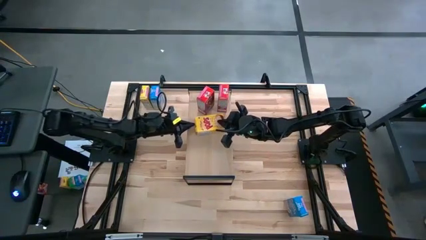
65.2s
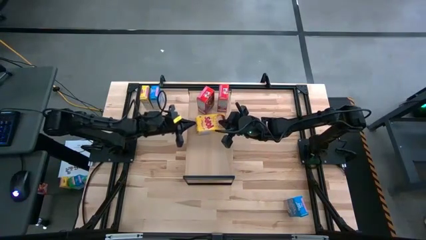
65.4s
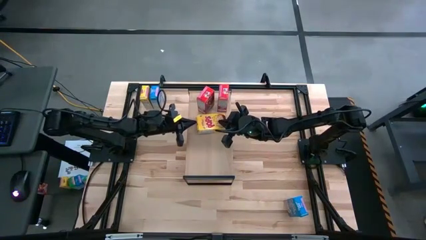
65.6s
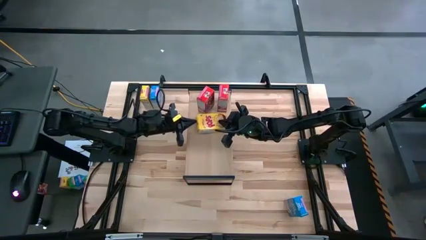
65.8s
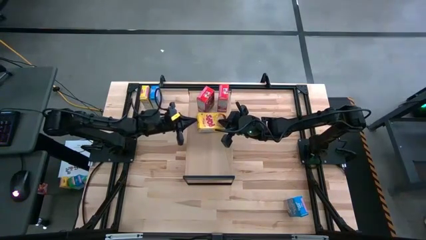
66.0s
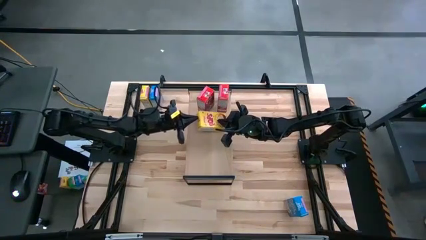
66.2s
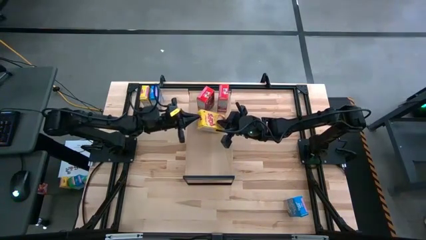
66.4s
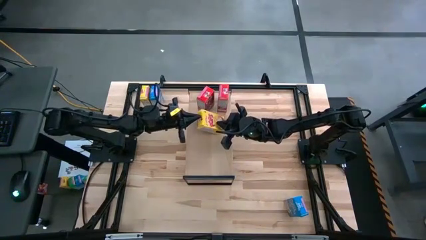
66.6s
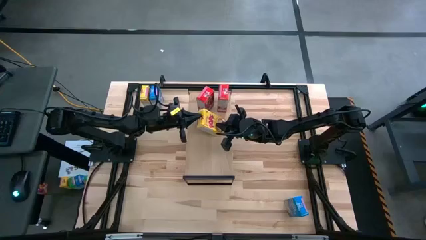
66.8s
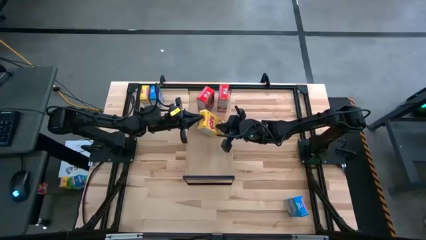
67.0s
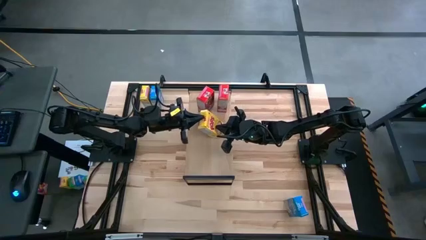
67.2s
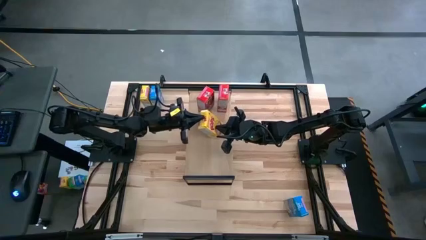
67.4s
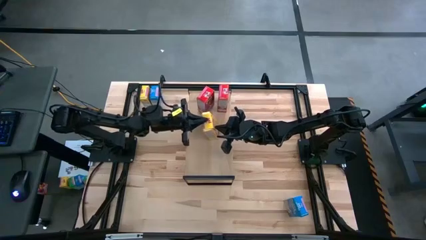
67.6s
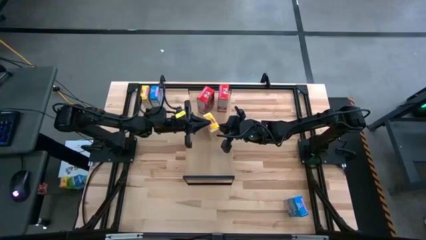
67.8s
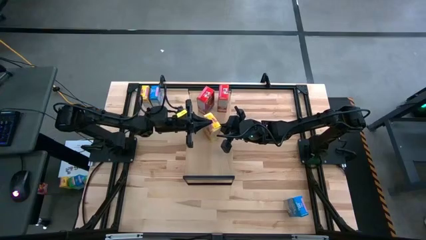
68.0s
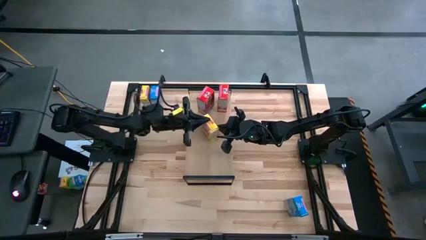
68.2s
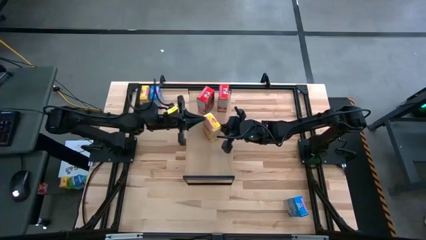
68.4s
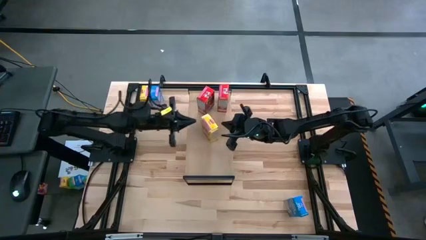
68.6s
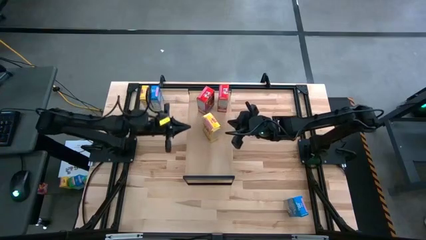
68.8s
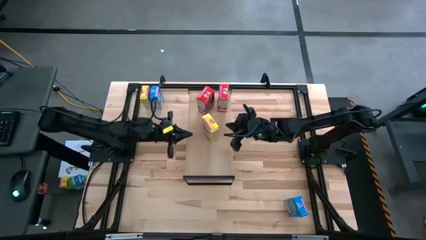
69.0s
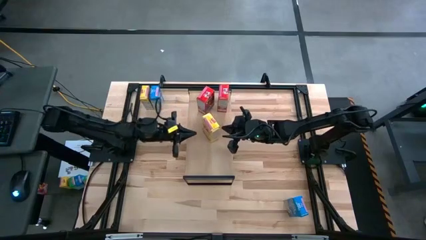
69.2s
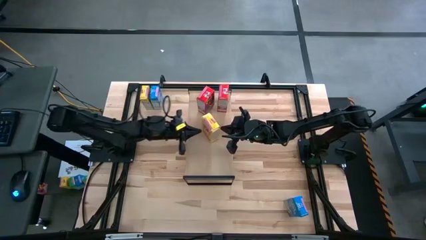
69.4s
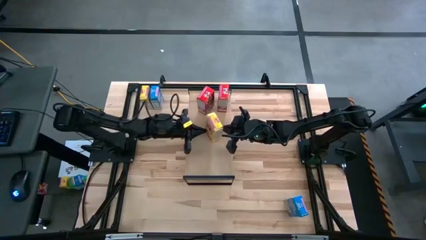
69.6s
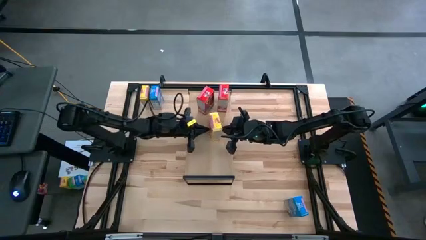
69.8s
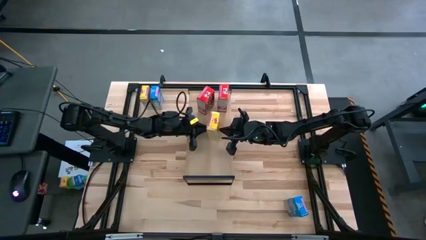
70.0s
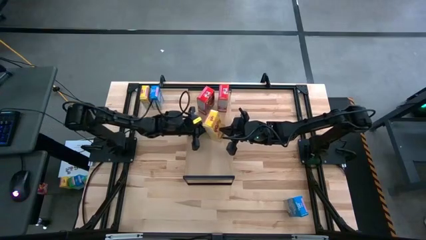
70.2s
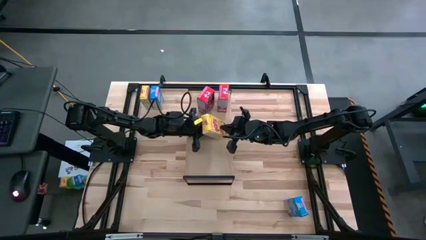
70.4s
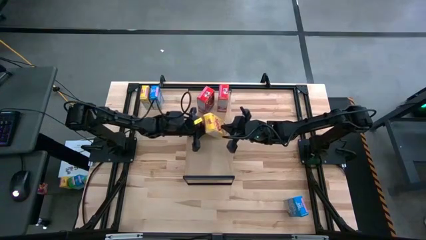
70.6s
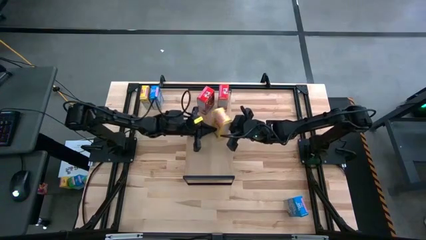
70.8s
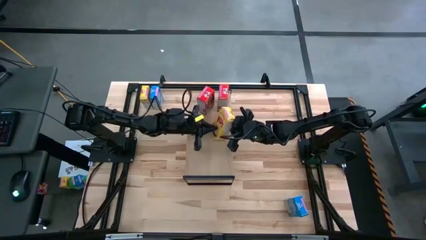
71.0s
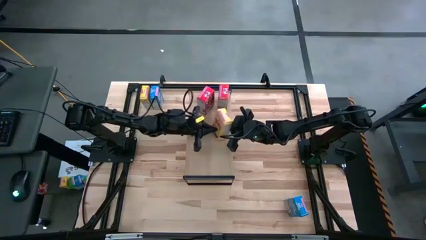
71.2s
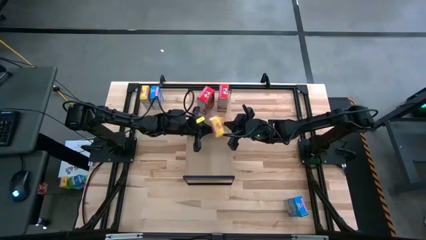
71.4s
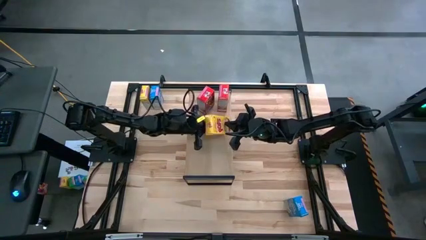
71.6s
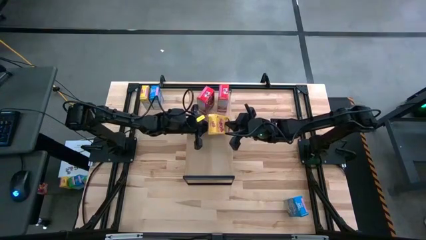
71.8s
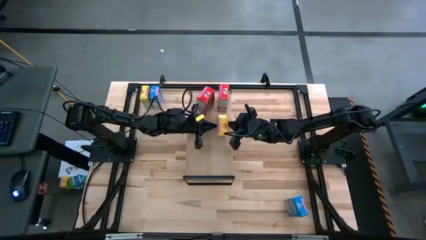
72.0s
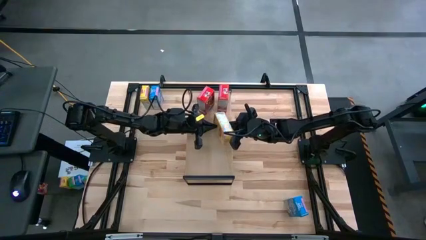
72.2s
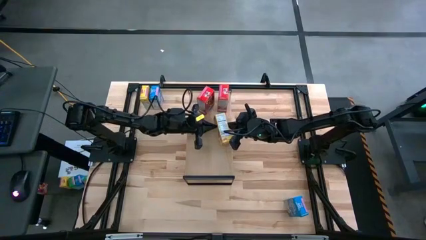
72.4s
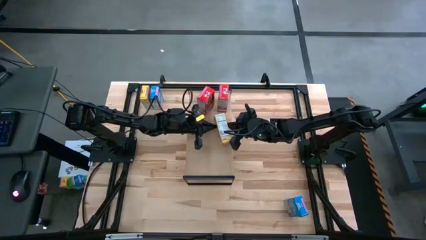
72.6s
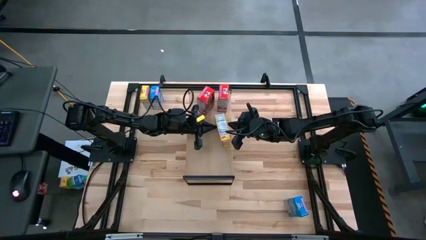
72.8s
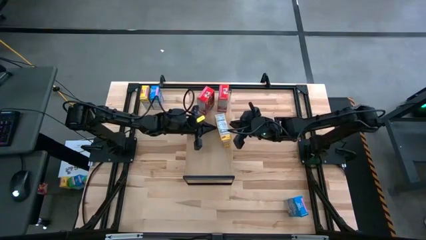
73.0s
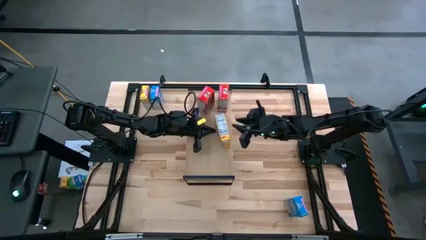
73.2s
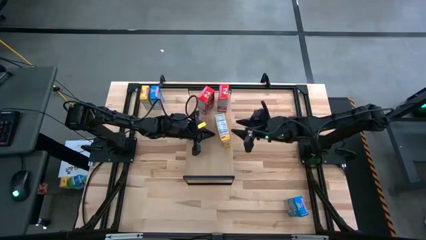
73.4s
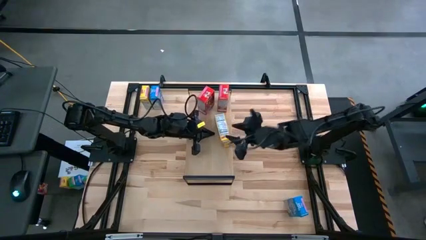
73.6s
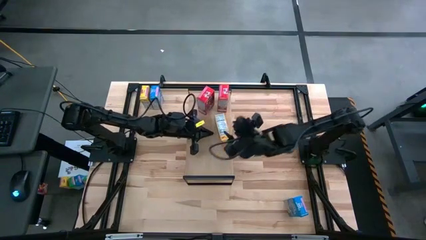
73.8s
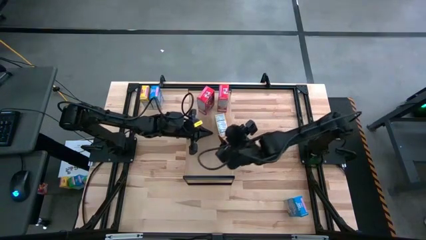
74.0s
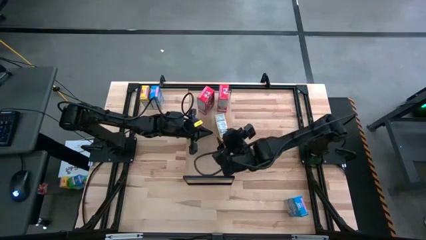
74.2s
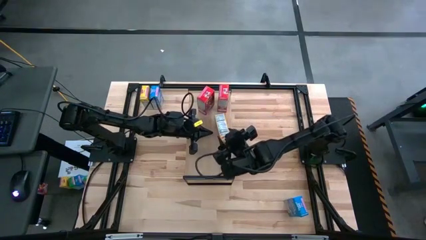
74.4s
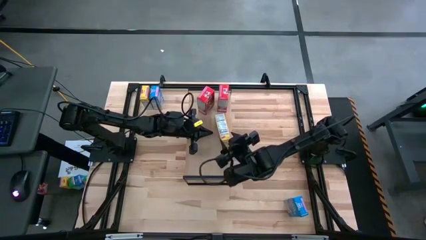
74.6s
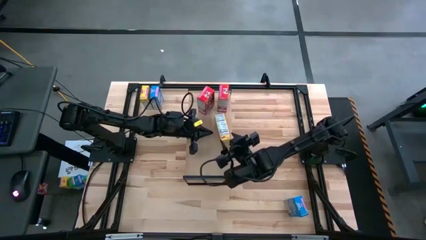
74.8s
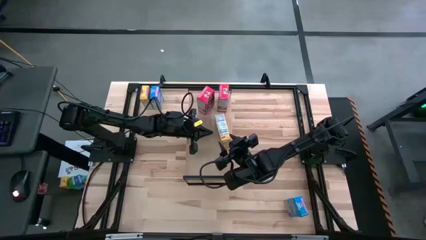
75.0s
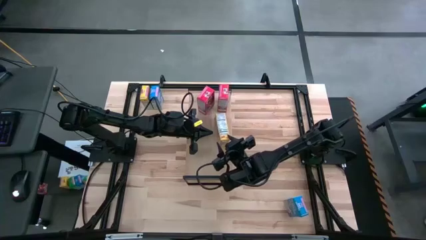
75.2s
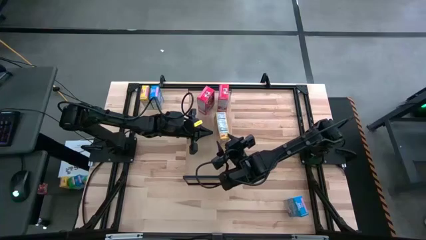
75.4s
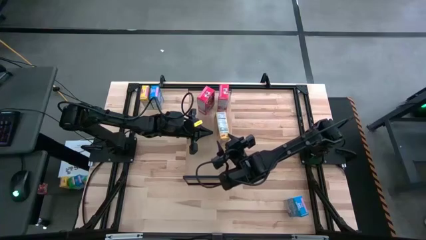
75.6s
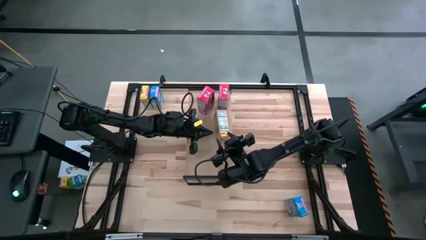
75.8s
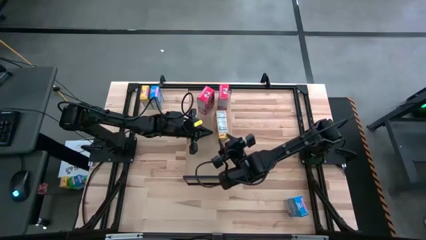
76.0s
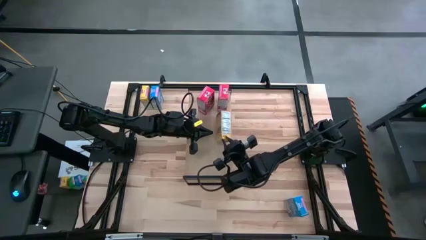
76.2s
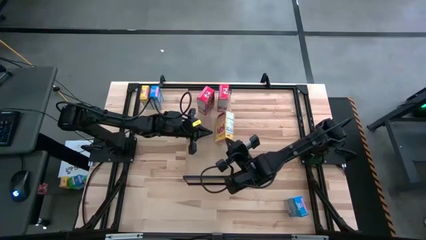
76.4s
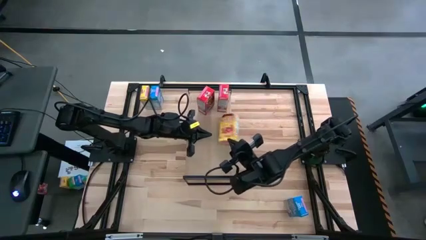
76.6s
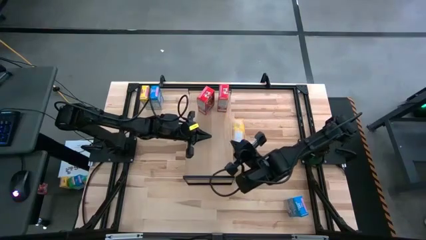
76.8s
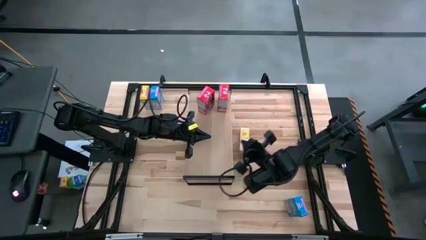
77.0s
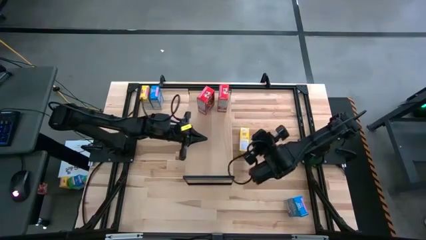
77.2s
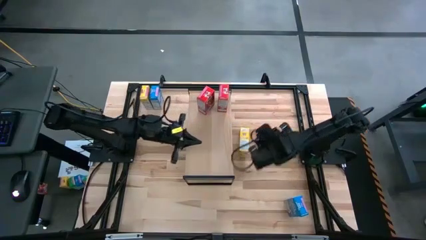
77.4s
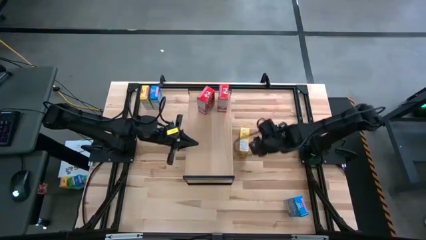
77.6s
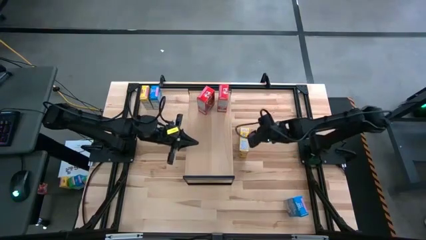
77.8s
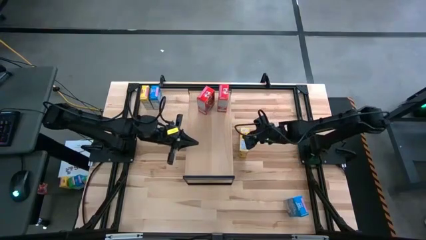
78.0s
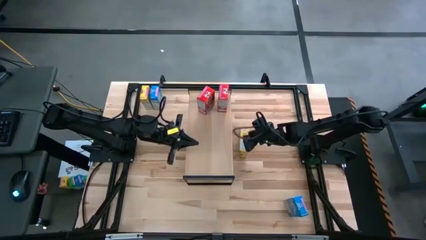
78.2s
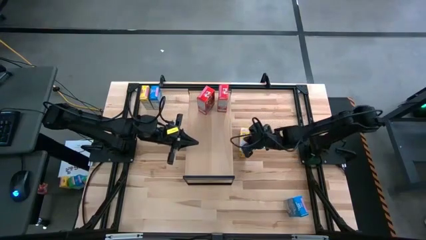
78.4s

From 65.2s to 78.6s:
Task: Stack cereal on shelf
Put the bottom yellow cereal box on the shelf
